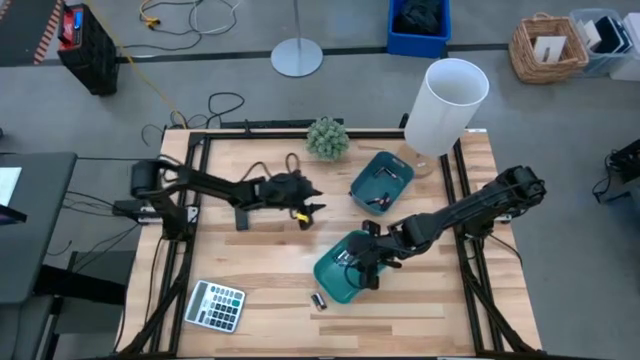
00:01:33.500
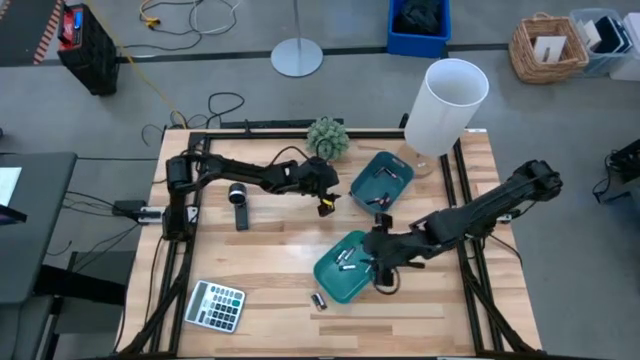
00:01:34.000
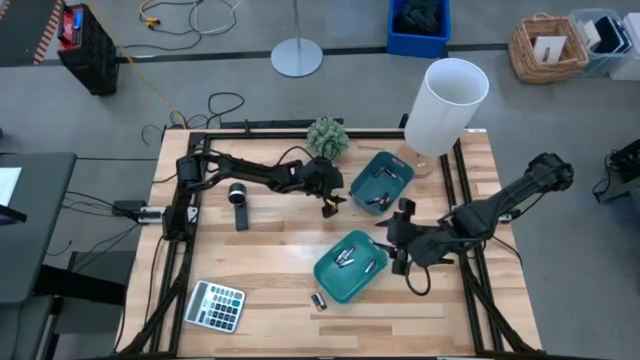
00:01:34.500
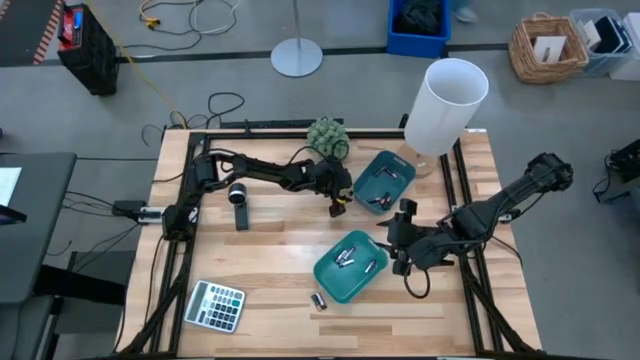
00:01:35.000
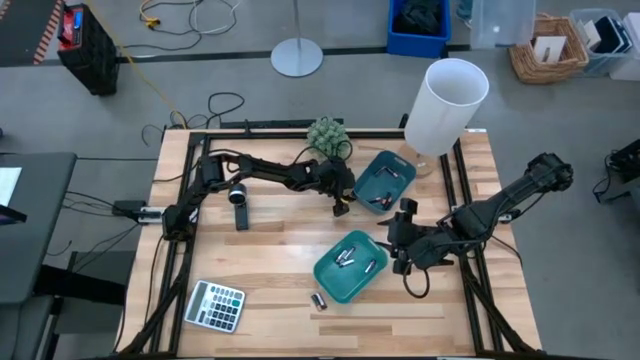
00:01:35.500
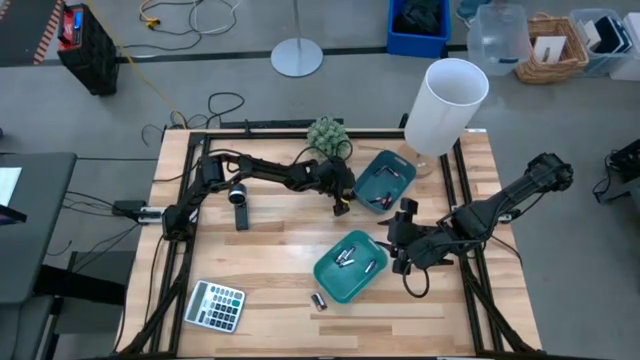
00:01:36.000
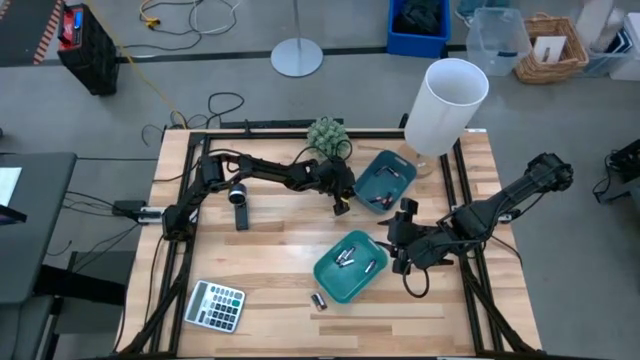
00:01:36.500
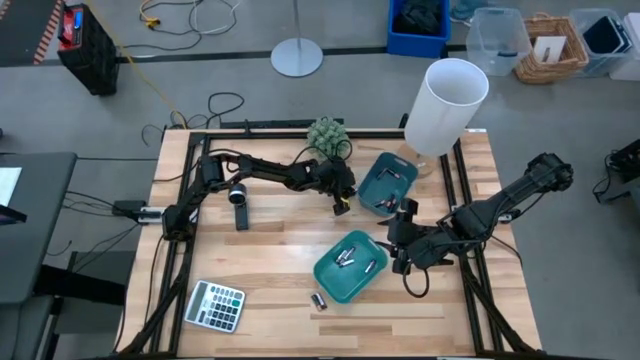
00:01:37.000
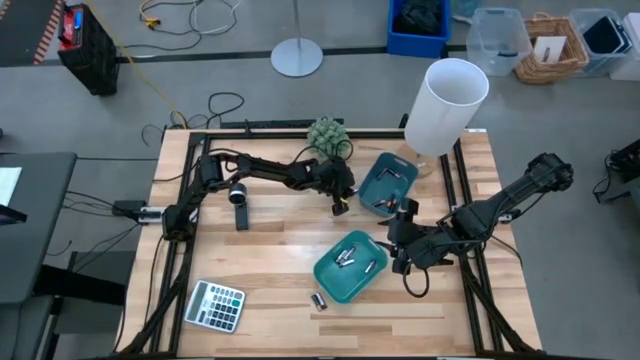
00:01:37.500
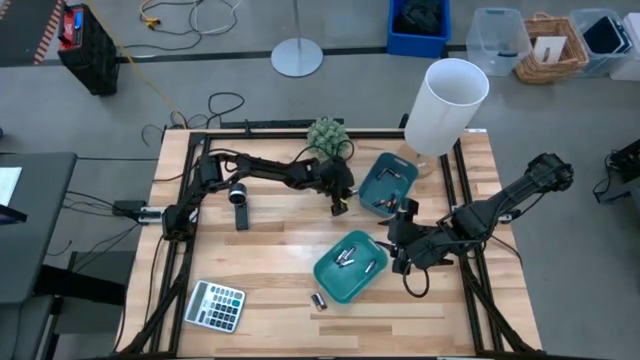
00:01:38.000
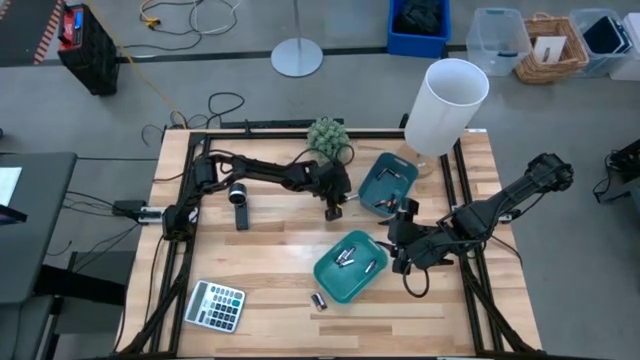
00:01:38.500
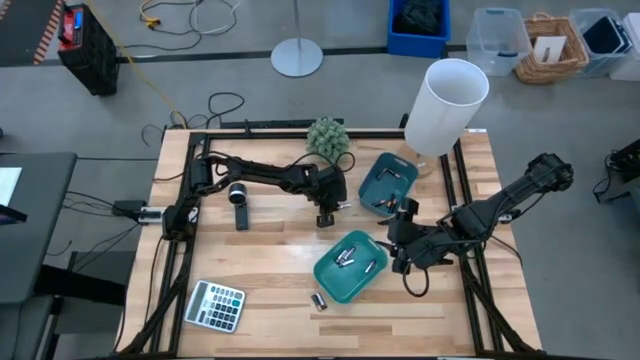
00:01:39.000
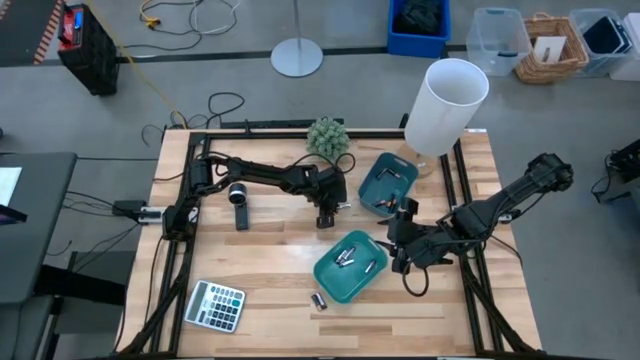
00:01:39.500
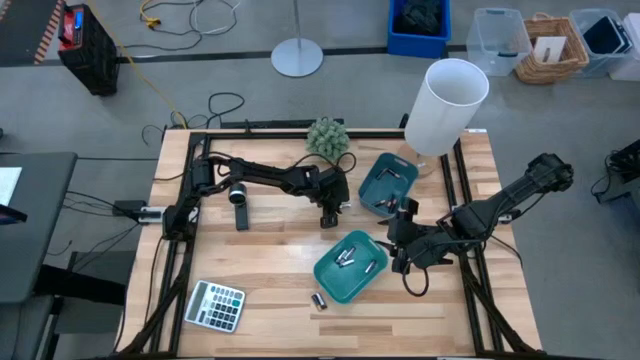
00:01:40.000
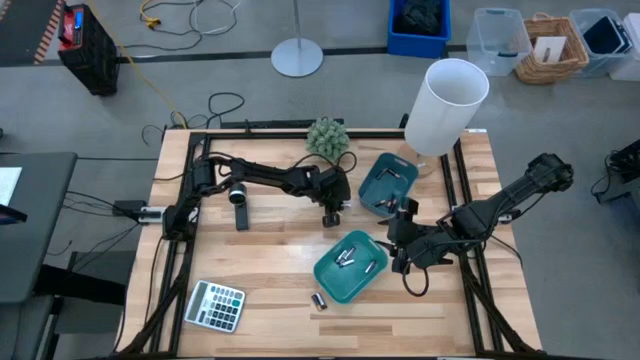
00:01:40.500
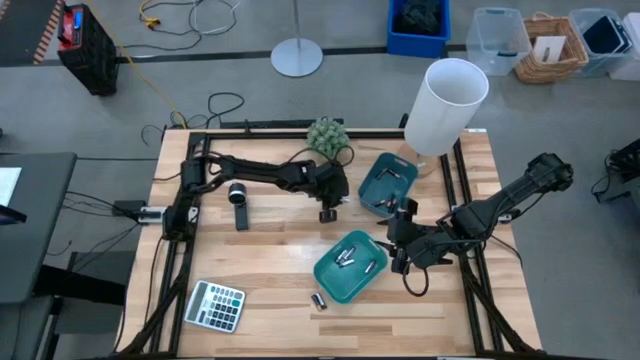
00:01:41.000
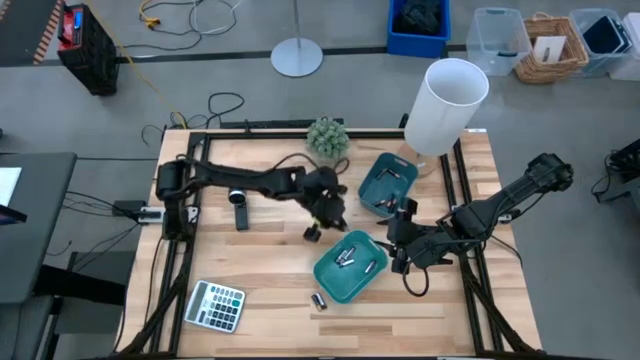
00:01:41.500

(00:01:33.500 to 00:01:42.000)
Task: Sort batteries
Put the silver battery into the green bin

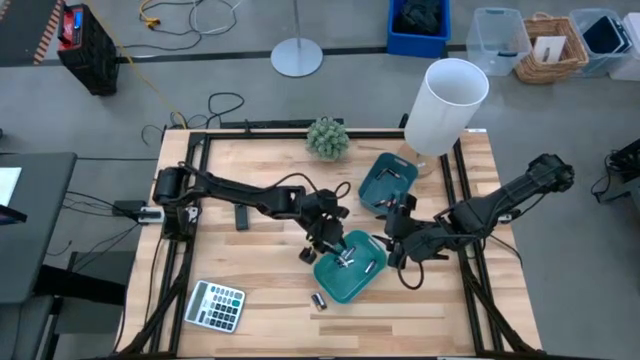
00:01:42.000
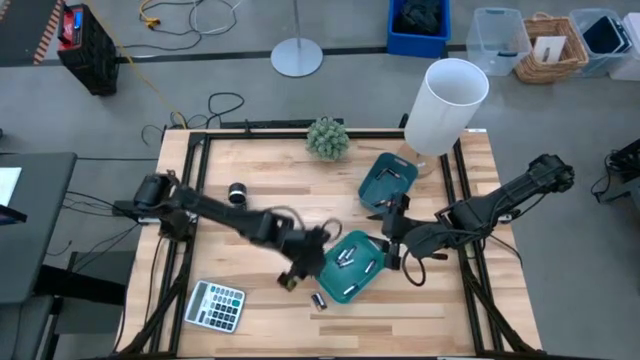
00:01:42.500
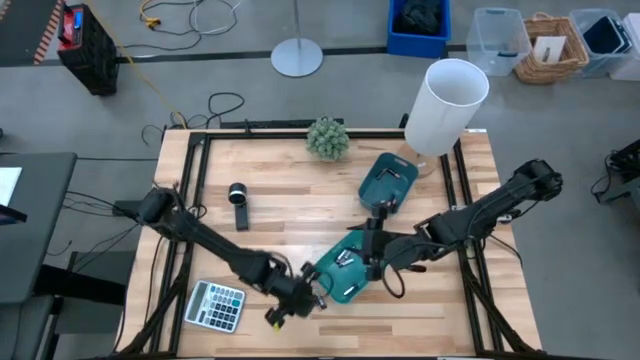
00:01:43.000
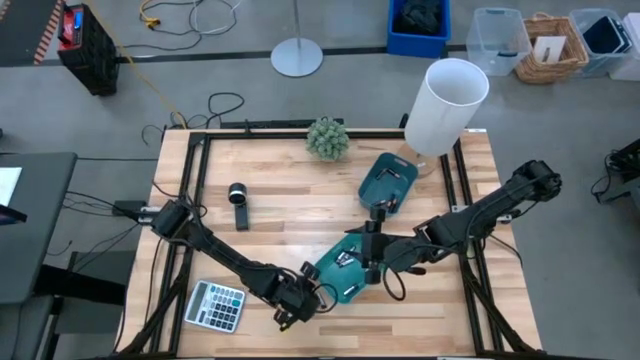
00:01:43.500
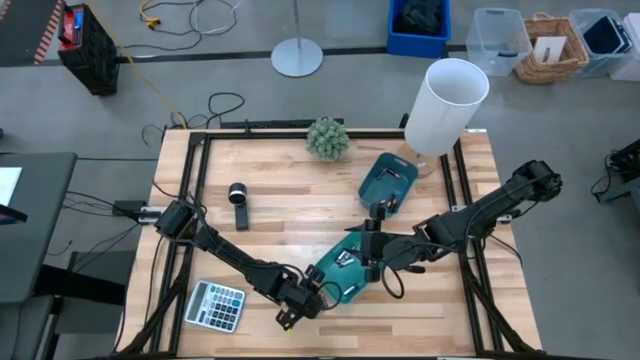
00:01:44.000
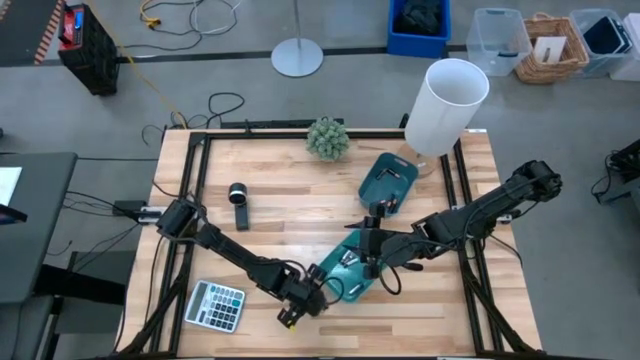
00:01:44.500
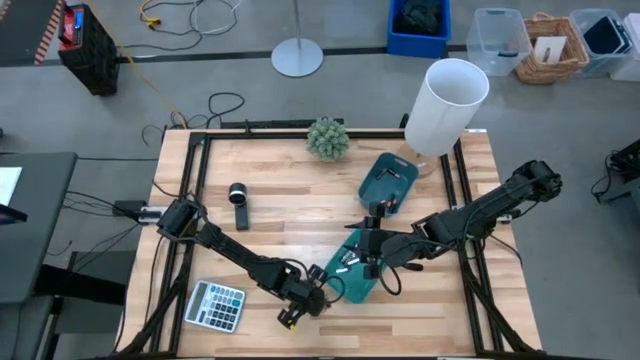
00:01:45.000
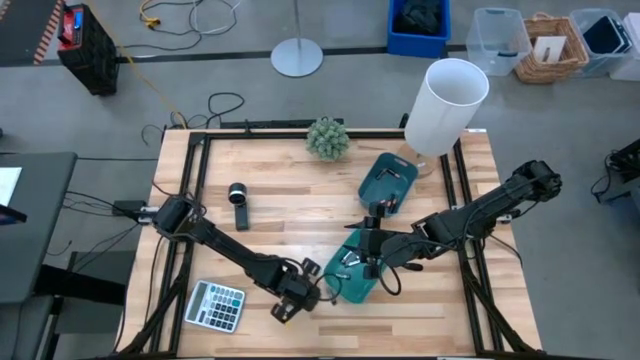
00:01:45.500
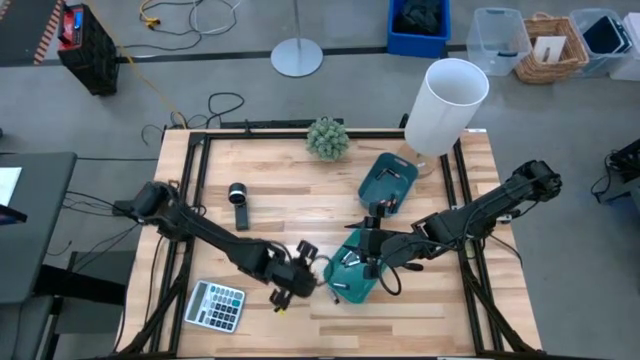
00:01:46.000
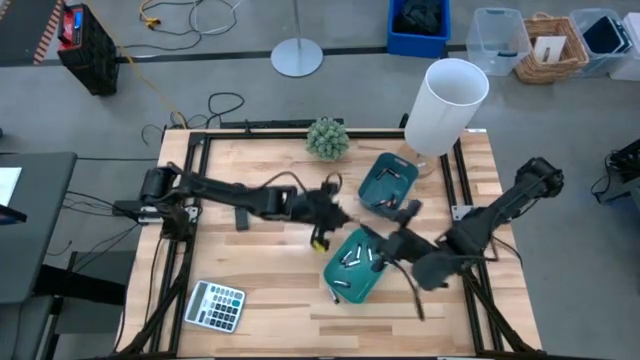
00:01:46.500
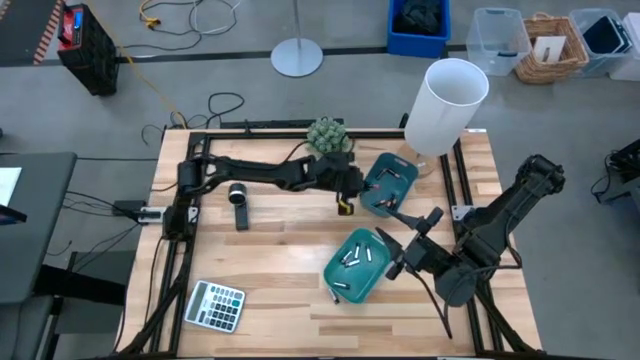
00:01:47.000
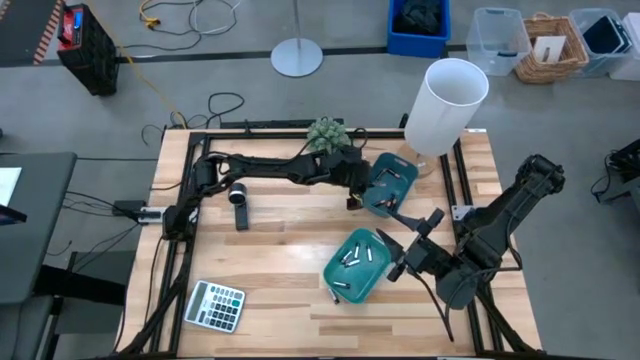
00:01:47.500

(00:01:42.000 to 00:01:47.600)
Put the black battery into the blue bin

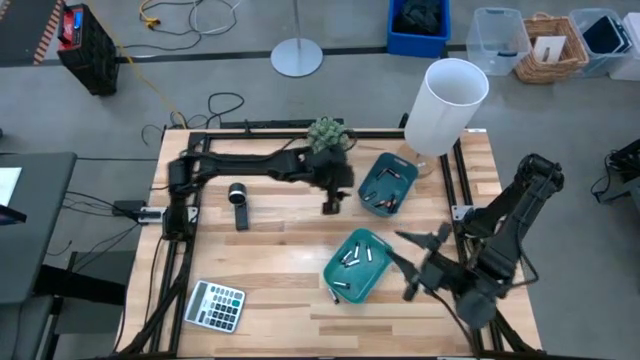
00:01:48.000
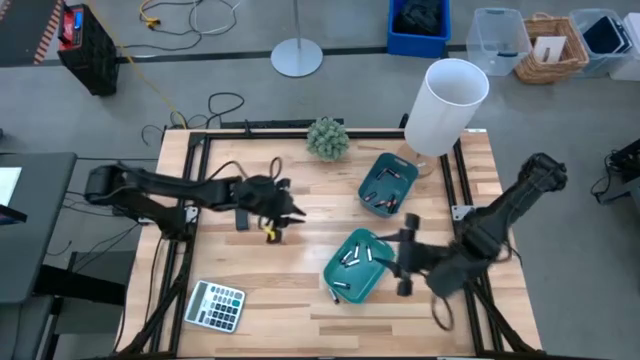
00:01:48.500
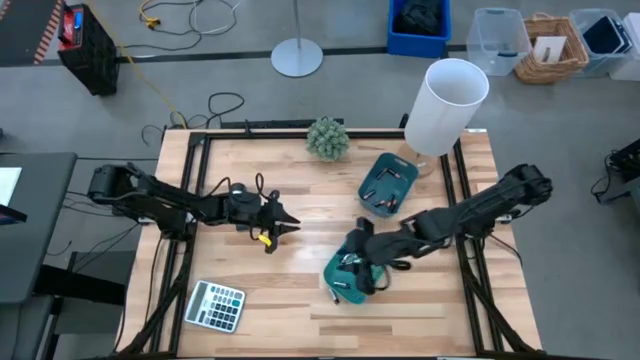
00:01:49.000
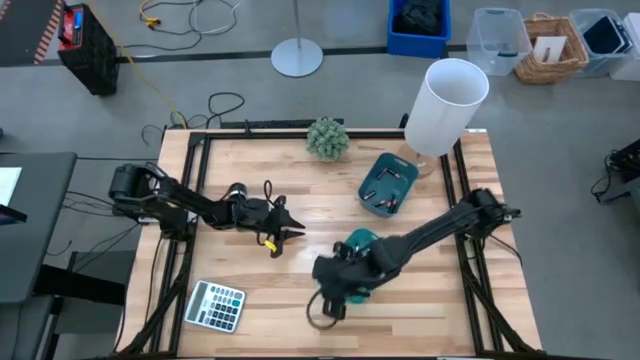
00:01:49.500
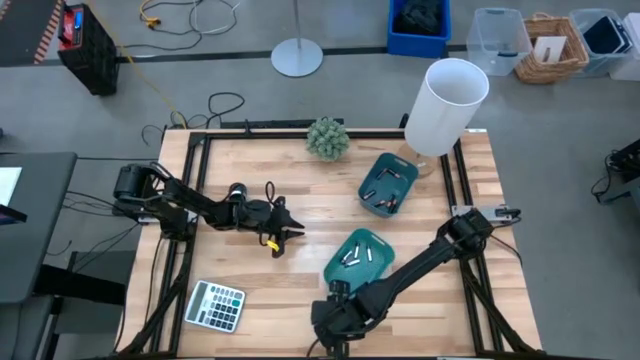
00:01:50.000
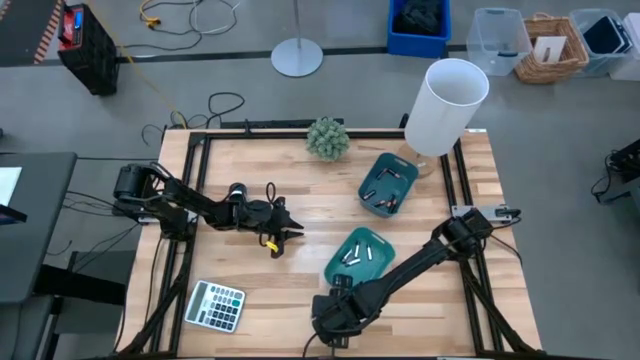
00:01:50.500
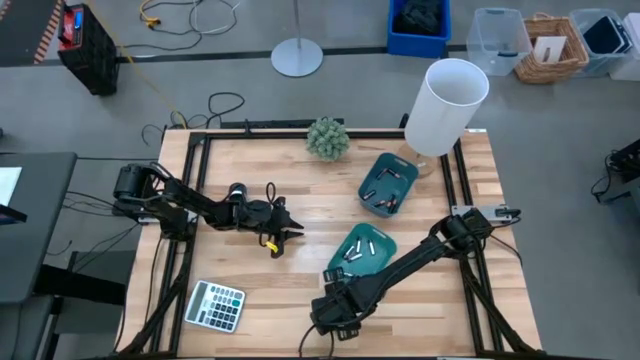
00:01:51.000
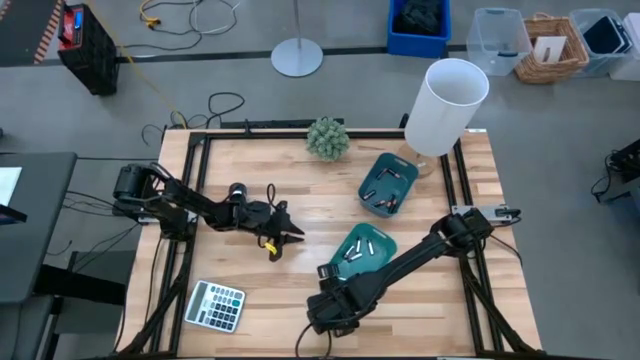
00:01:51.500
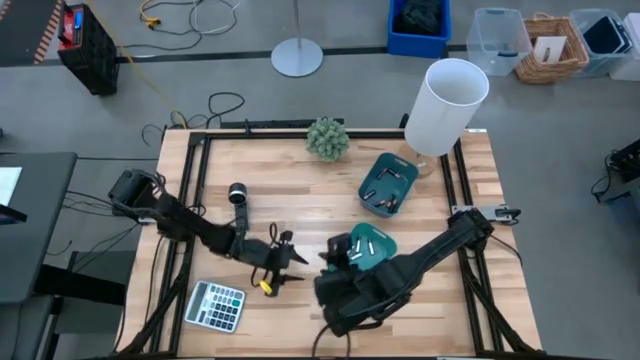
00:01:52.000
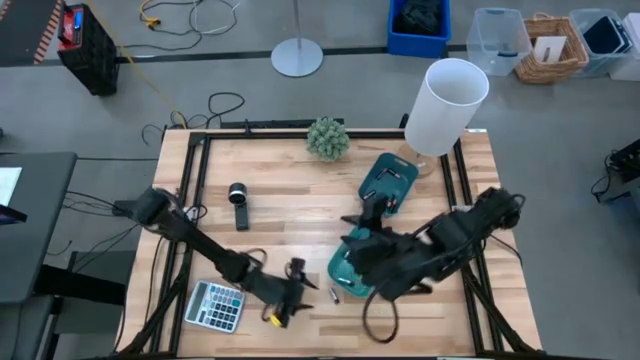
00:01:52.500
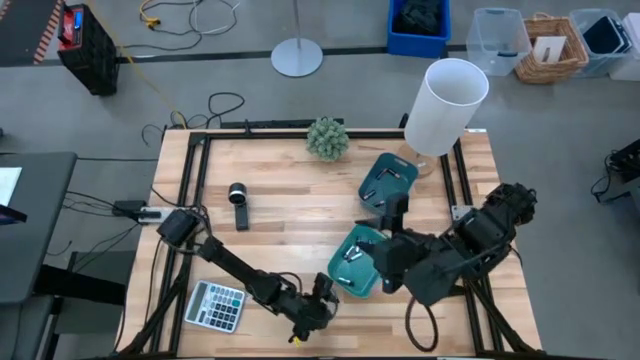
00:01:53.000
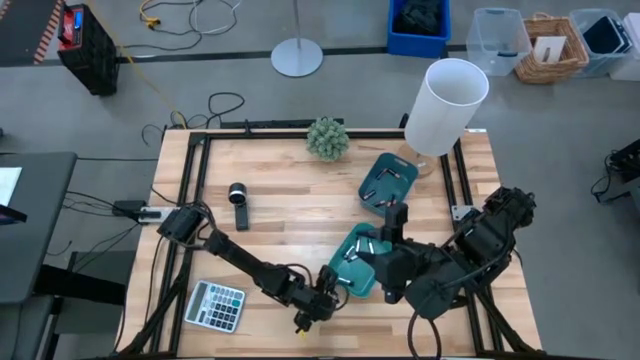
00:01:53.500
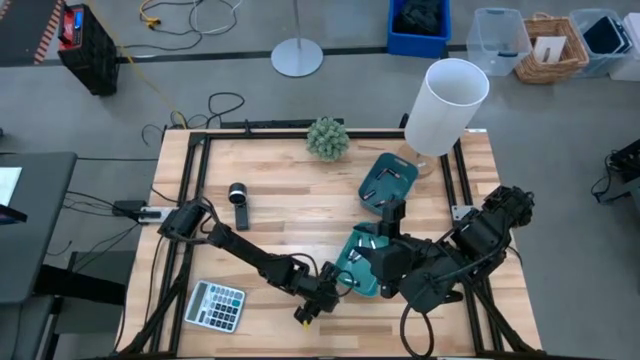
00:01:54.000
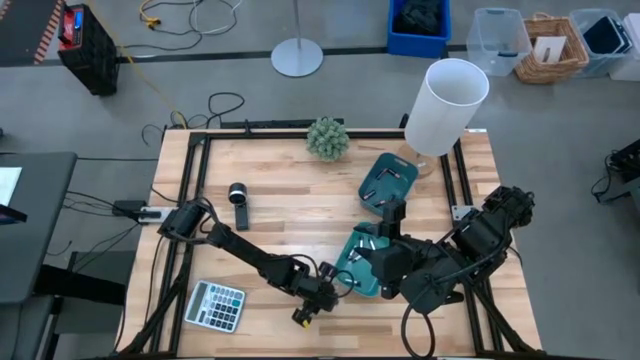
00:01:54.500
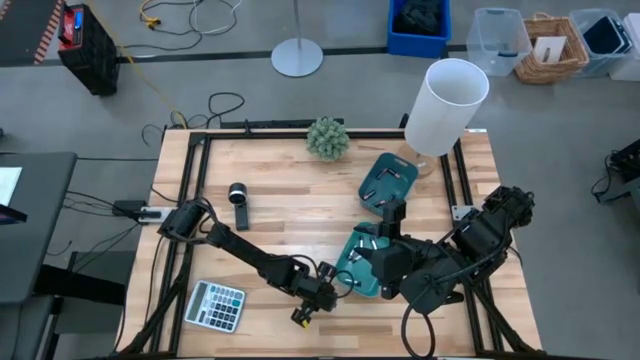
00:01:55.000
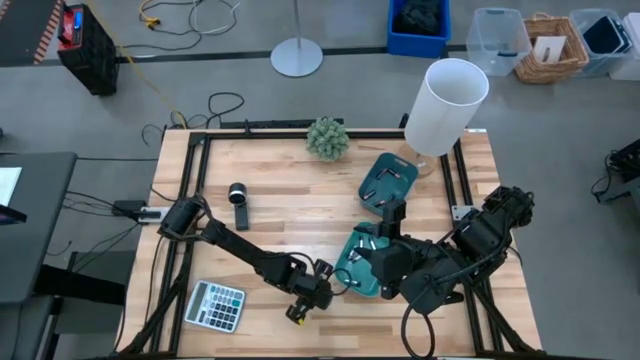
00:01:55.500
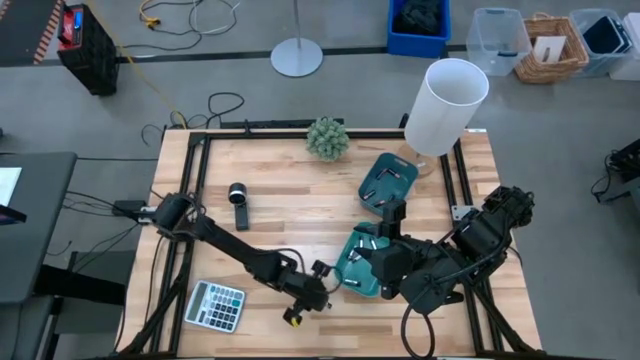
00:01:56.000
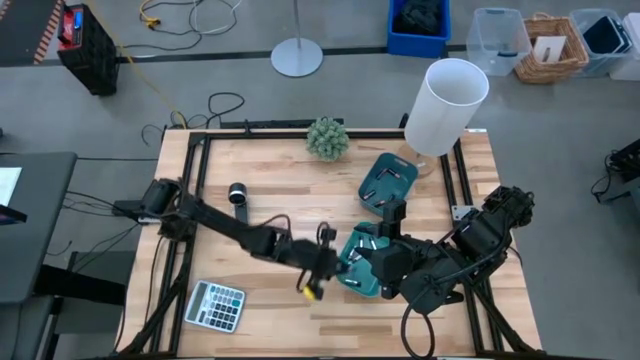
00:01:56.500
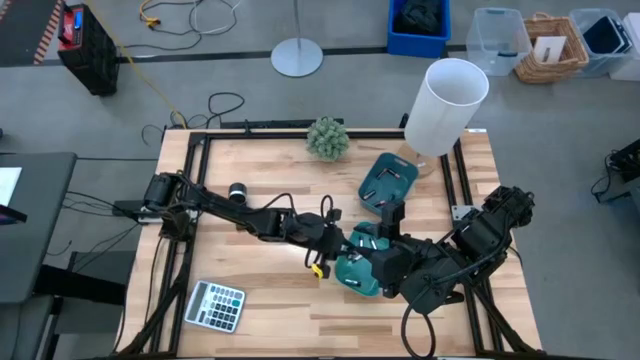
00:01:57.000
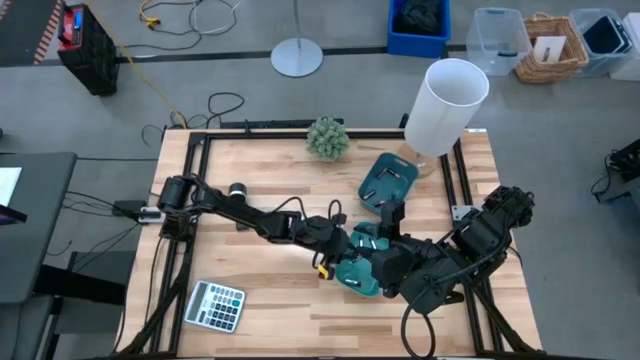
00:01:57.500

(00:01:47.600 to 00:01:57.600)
Put the silver battery into the green bin
